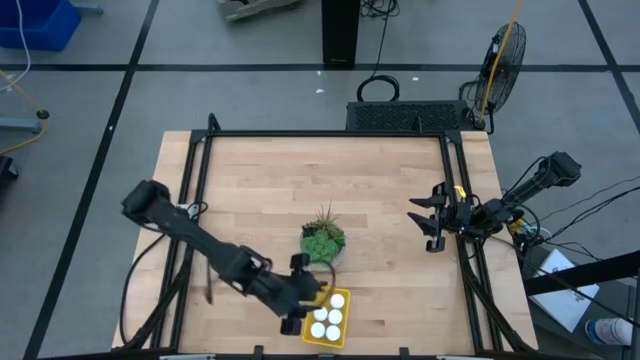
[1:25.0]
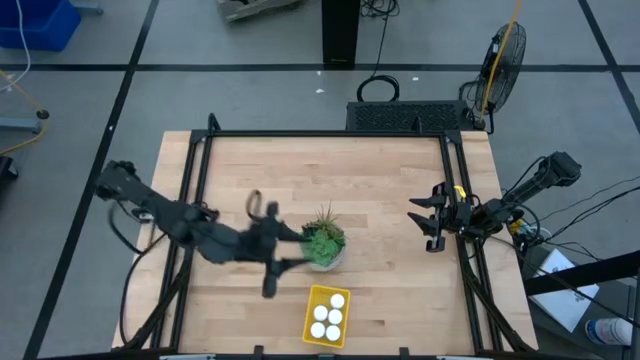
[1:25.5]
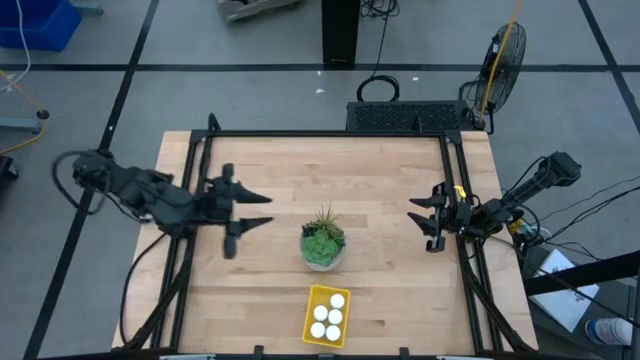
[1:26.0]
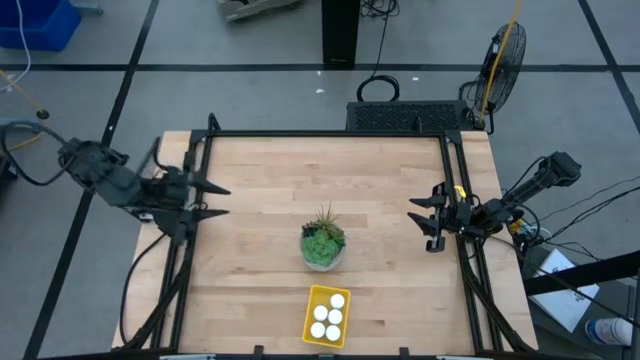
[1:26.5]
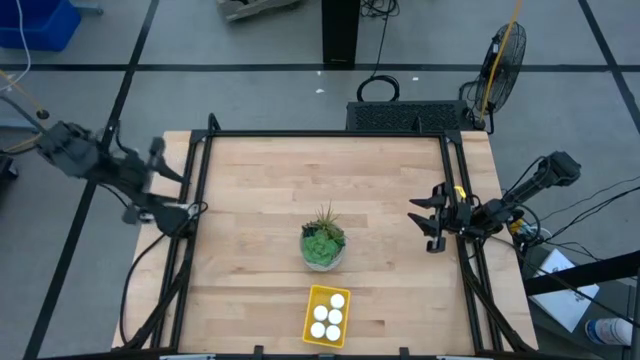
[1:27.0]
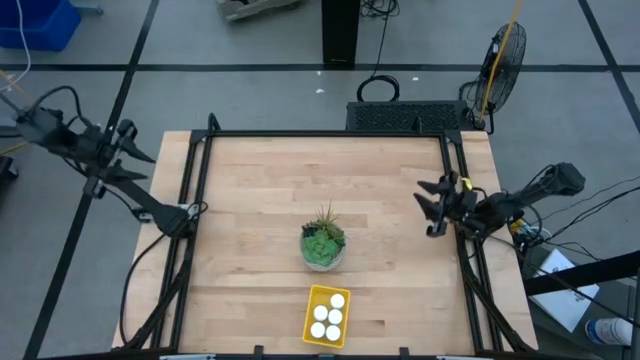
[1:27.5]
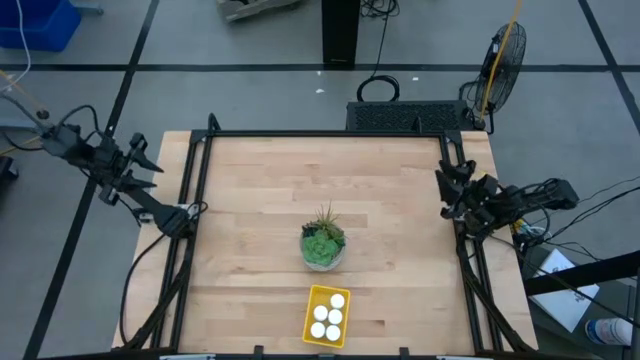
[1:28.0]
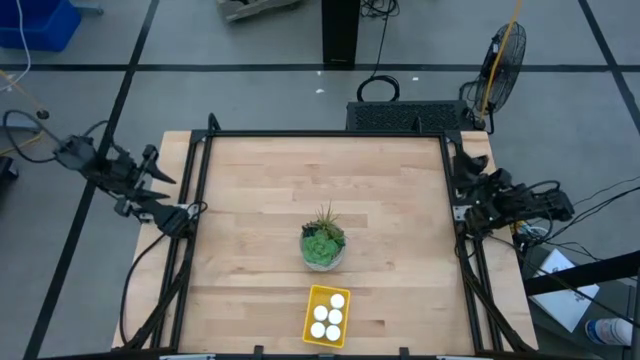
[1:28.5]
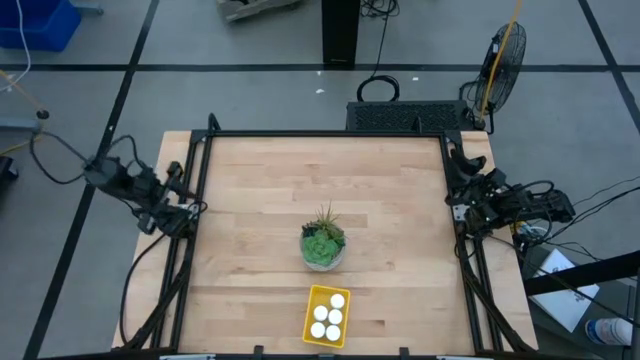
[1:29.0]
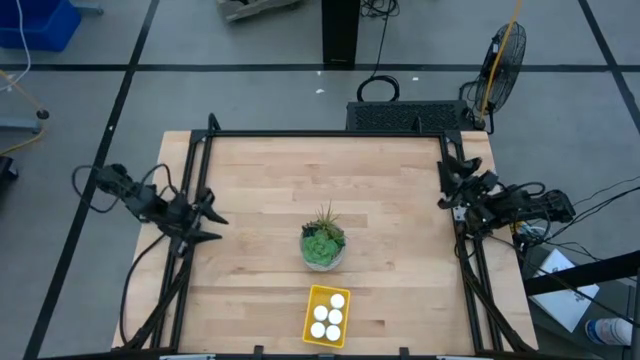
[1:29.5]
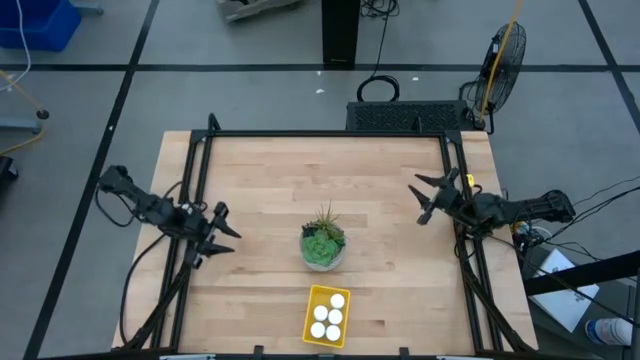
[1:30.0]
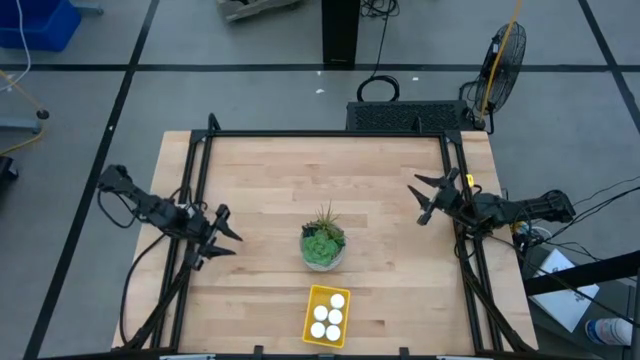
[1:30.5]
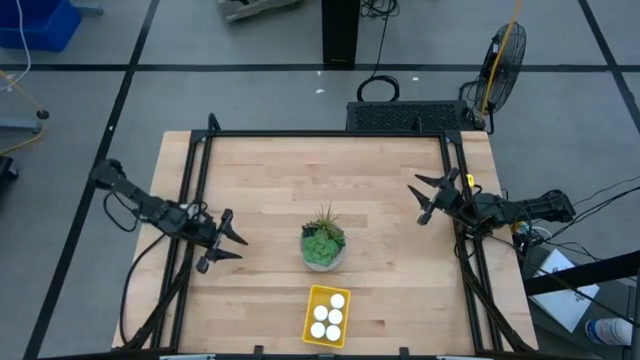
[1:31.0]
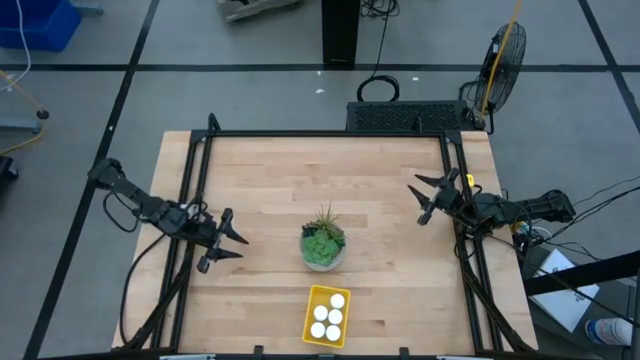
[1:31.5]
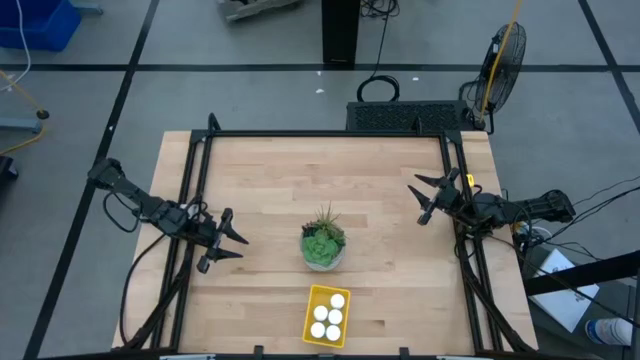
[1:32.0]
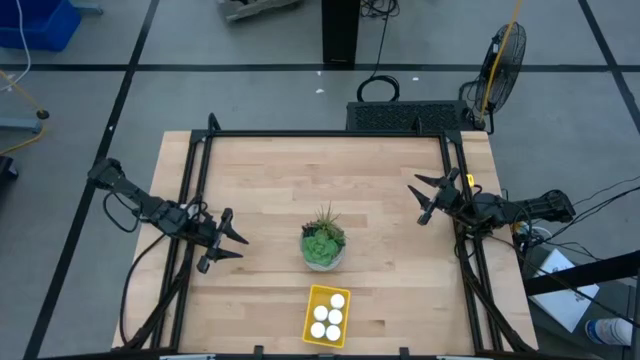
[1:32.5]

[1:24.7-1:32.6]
Task: Pick and place pill bottles into a basket
Return to Home Position

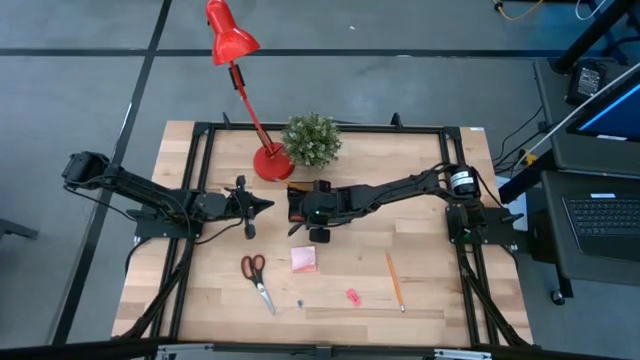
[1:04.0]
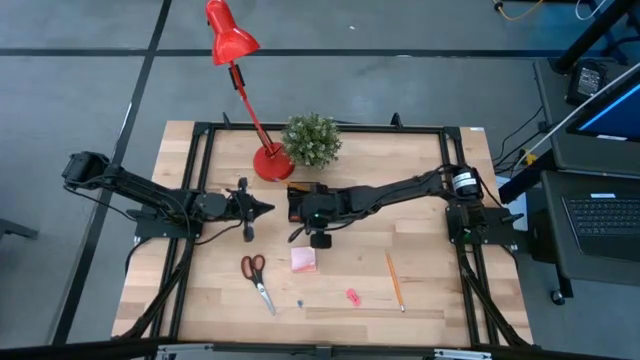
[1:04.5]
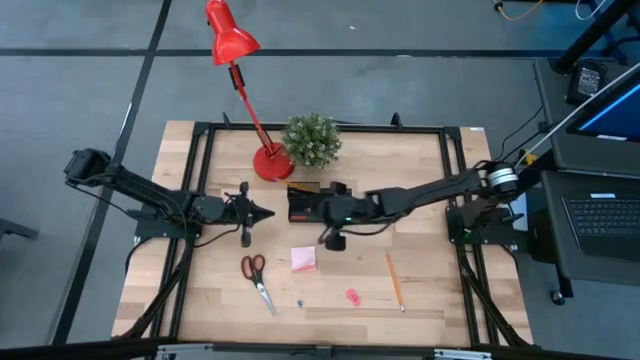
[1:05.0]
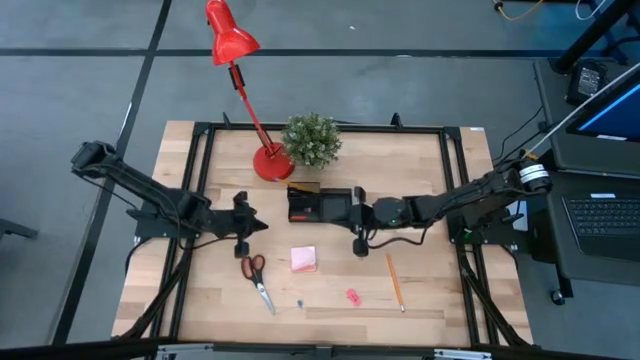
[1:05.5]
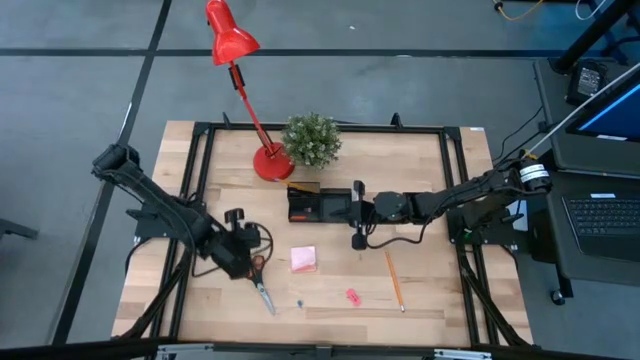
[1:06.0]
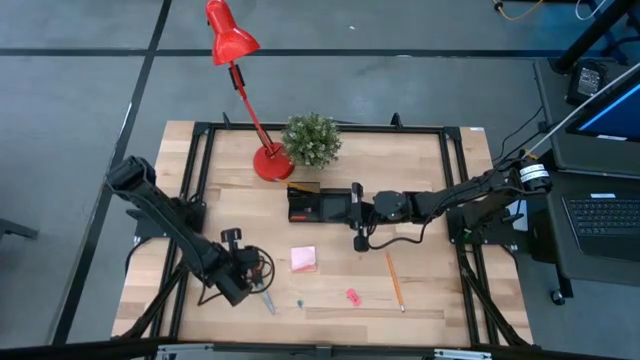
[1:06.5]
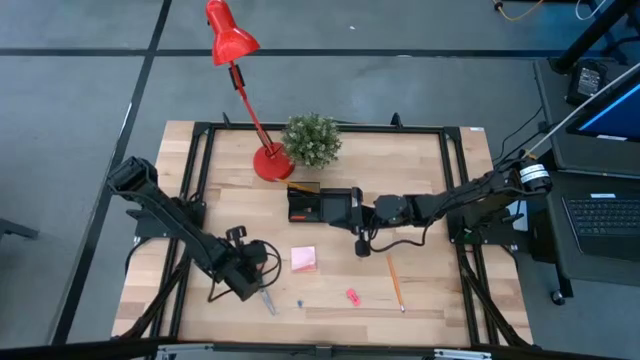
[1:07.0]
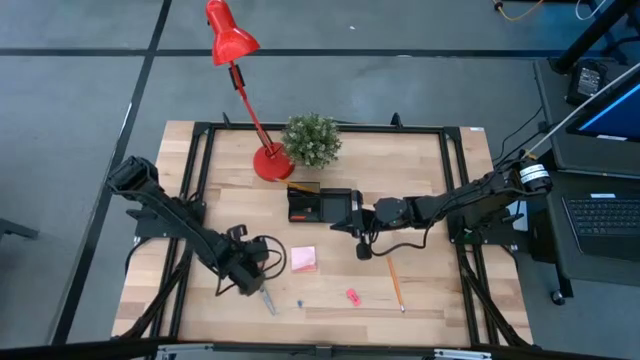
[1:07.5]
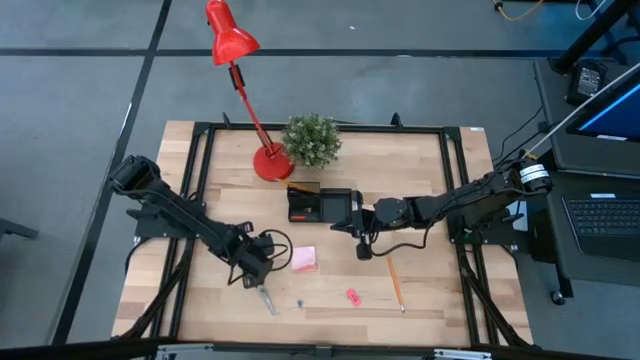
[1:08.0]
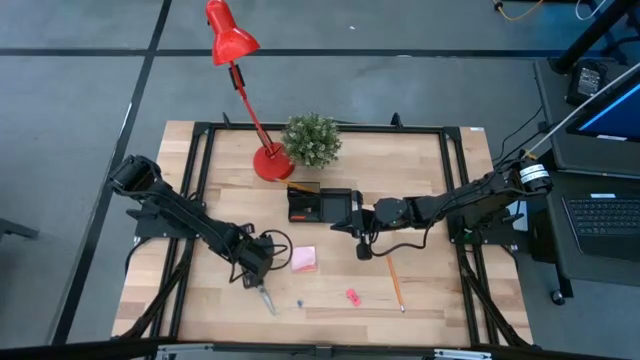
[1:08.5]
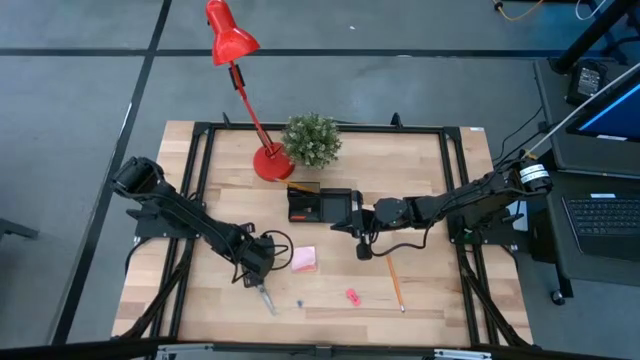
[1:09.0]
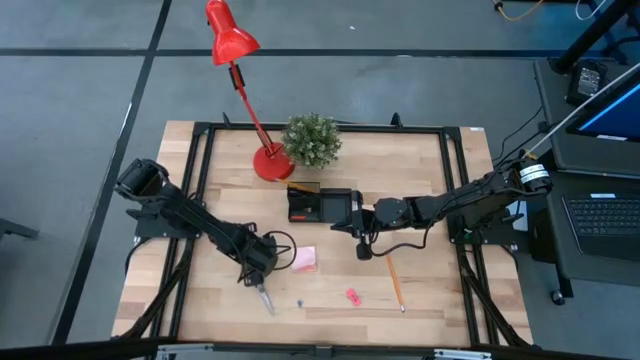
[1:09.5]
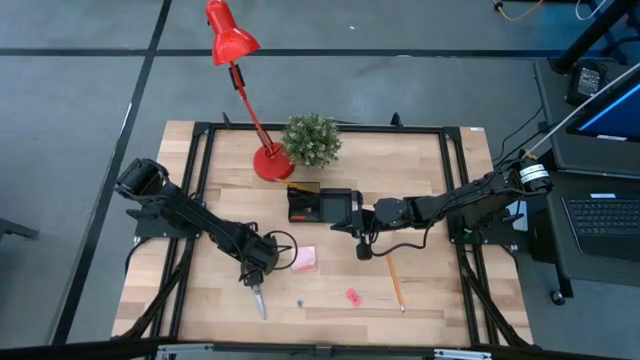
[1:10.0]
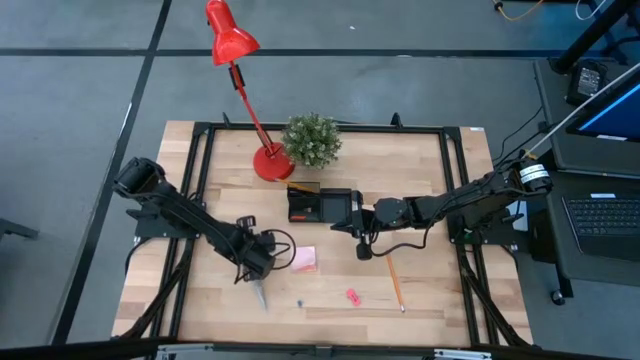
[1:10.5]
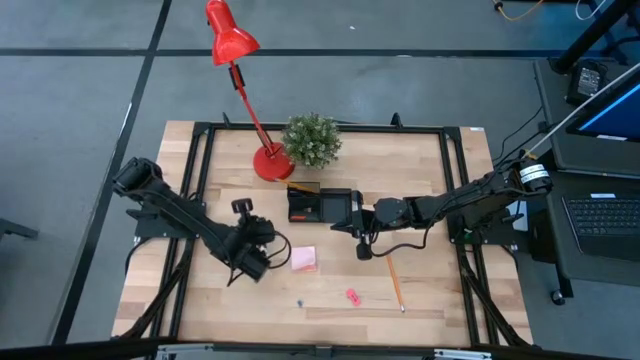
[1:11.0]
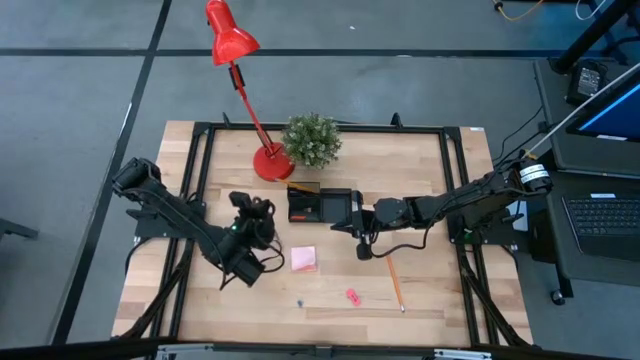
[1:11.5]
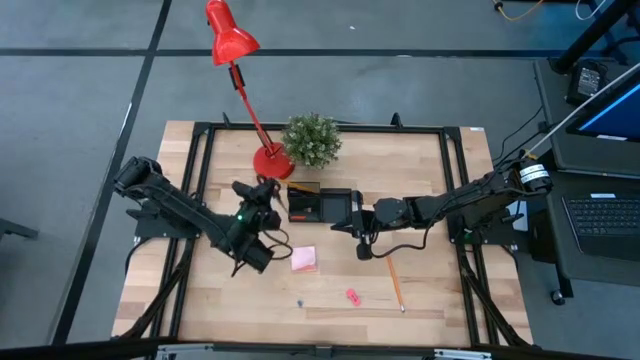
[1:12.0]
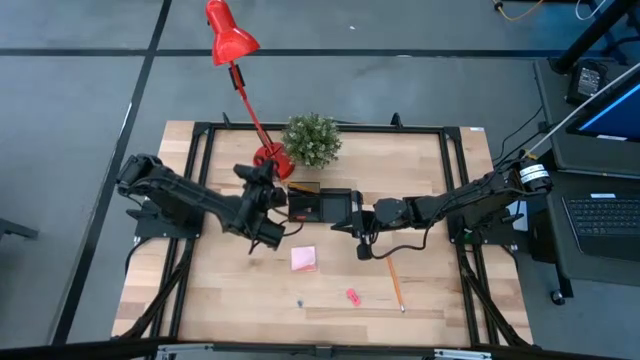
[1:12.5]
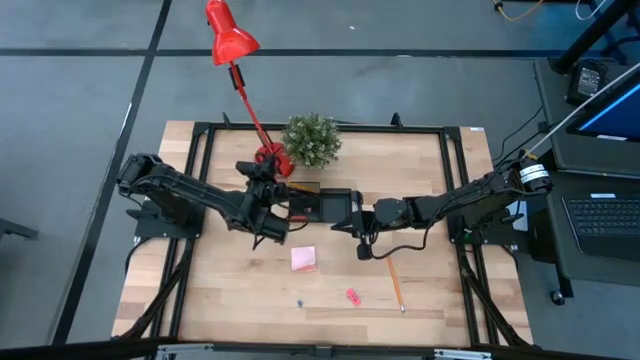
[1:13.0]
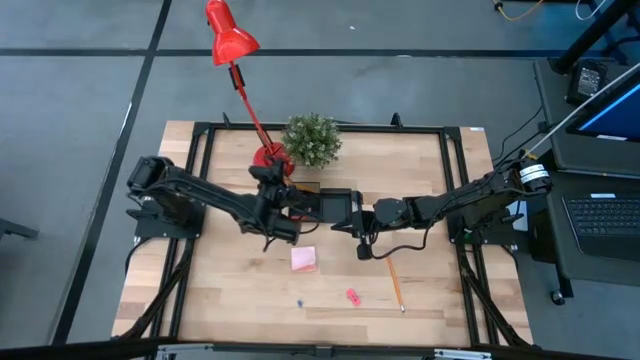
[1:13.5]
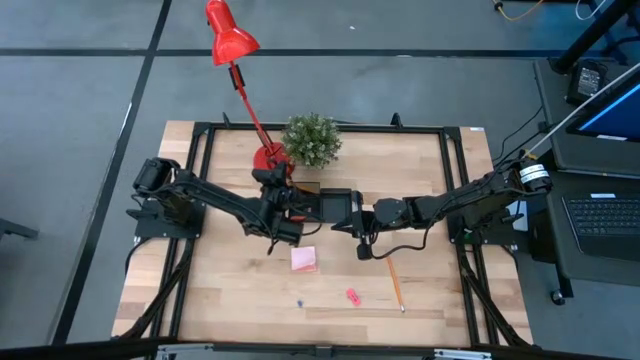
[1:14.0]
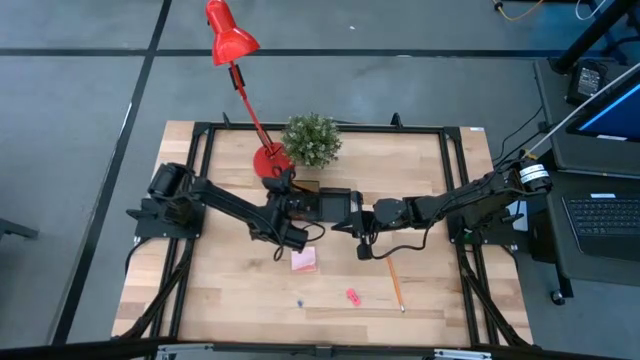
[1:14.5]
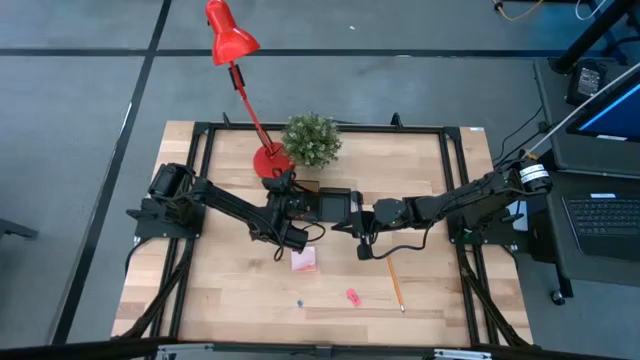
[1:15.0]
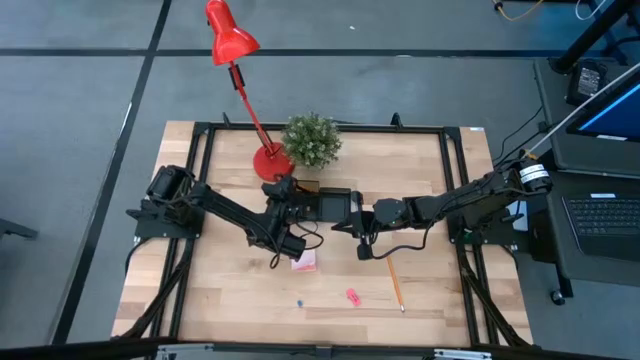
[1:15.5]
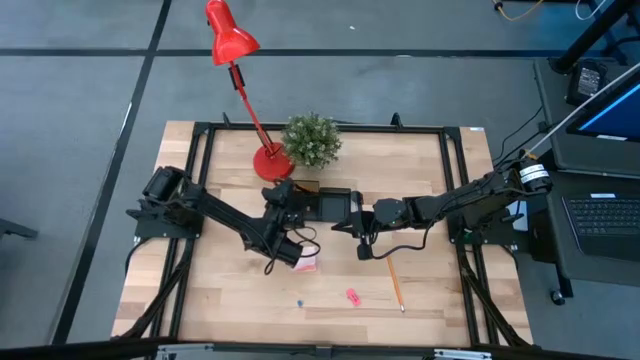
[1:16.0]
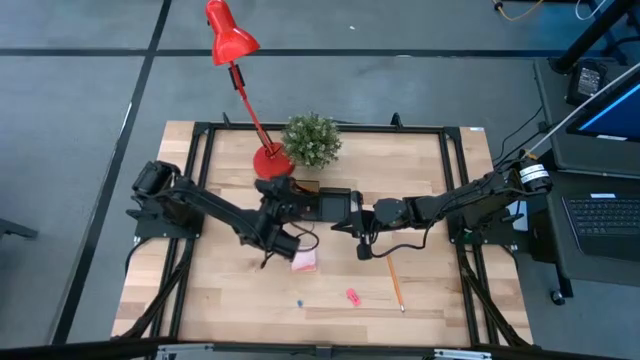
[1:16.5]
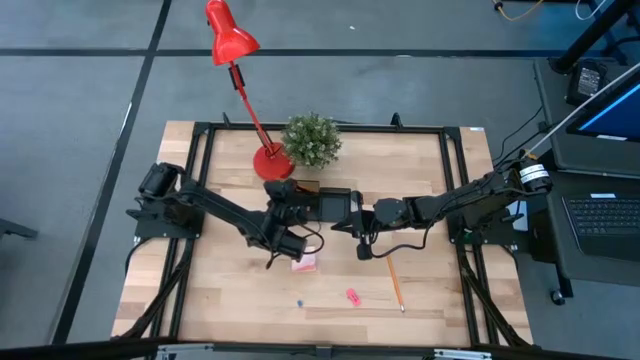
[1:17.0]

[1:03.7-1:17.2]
Task: Pick and place office supplies into organizer
Put the black scissors into the black desk organizer
